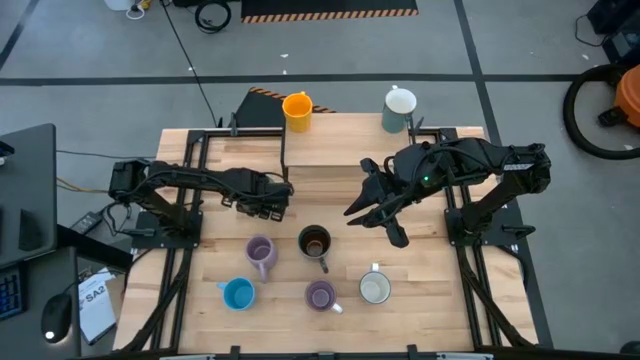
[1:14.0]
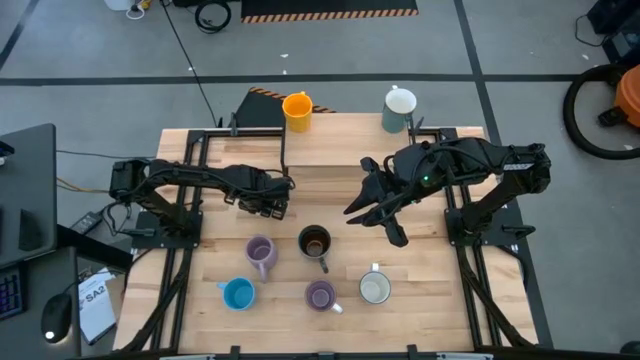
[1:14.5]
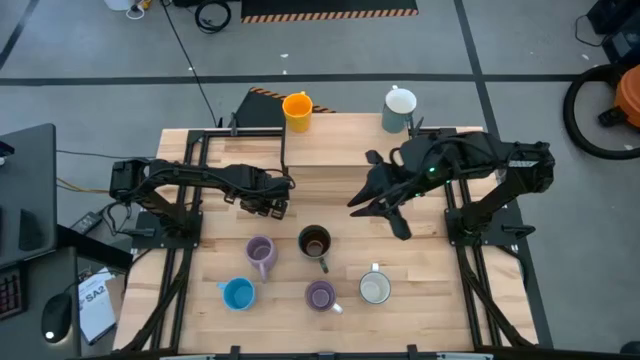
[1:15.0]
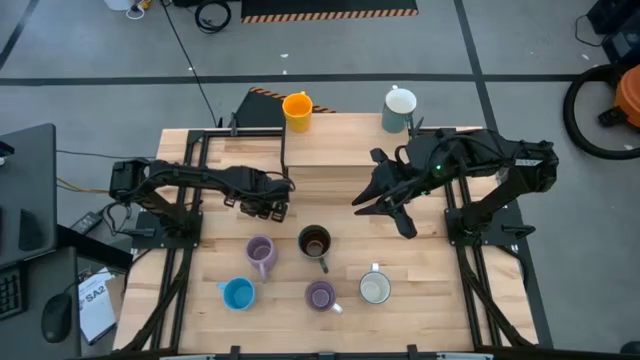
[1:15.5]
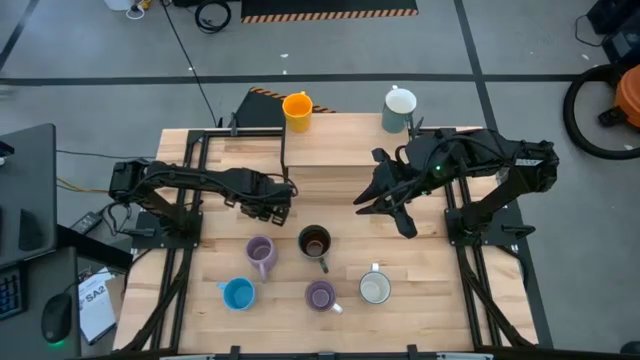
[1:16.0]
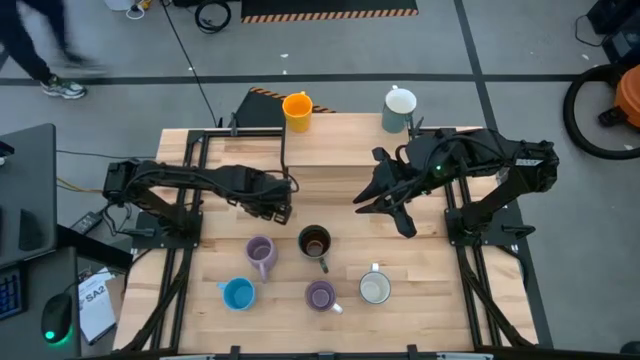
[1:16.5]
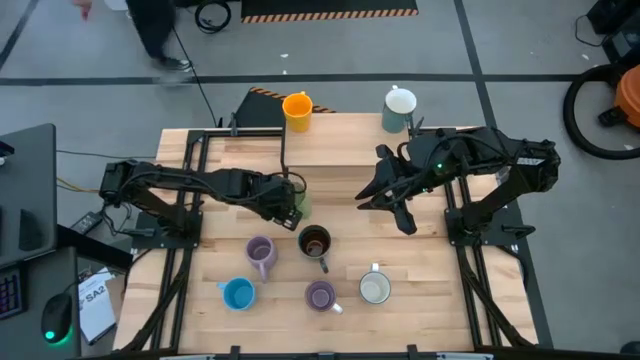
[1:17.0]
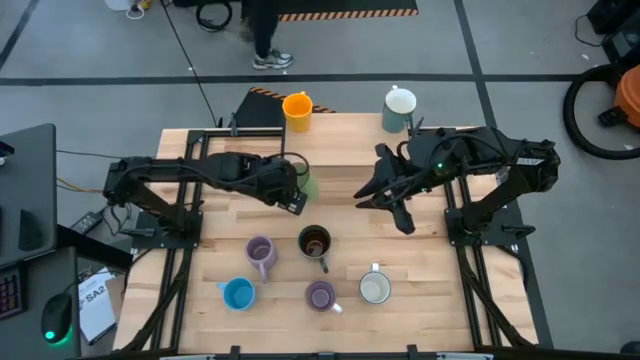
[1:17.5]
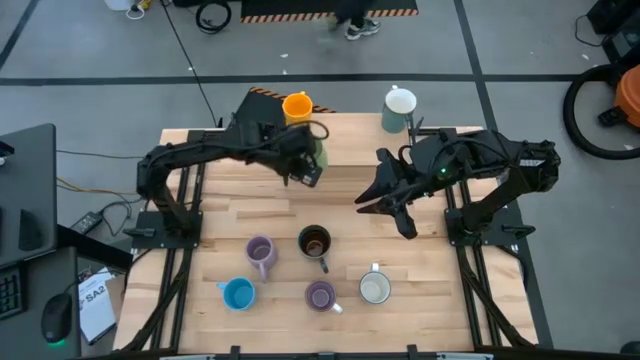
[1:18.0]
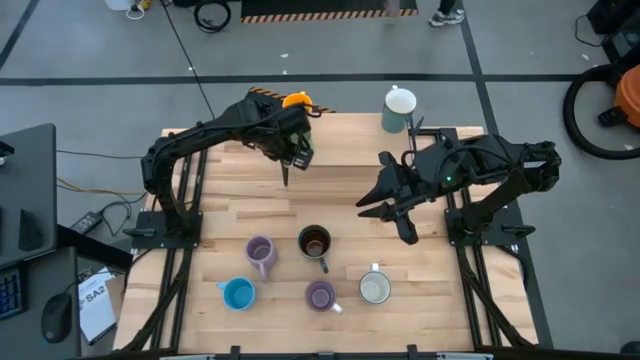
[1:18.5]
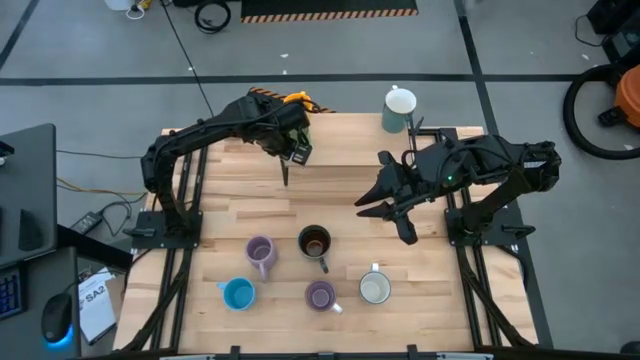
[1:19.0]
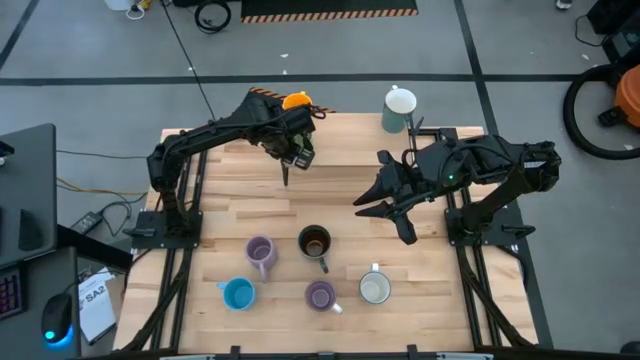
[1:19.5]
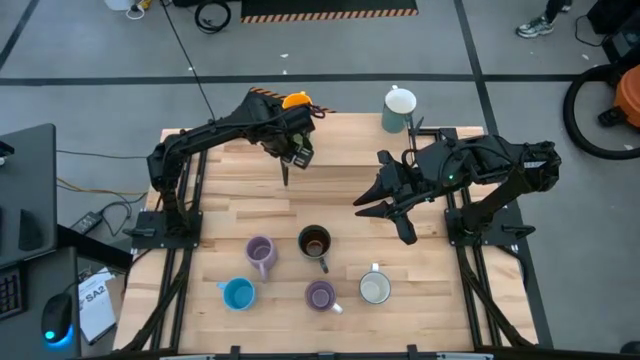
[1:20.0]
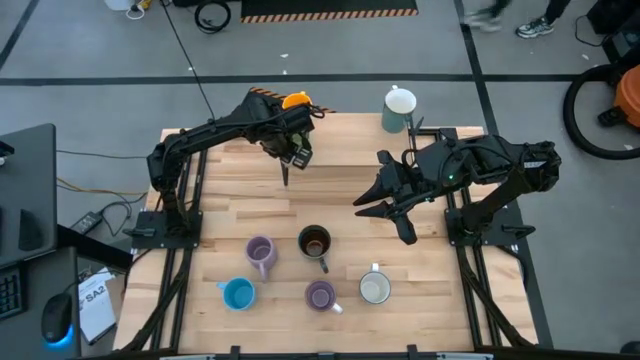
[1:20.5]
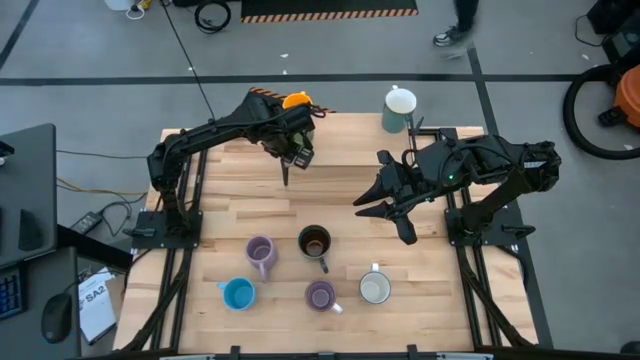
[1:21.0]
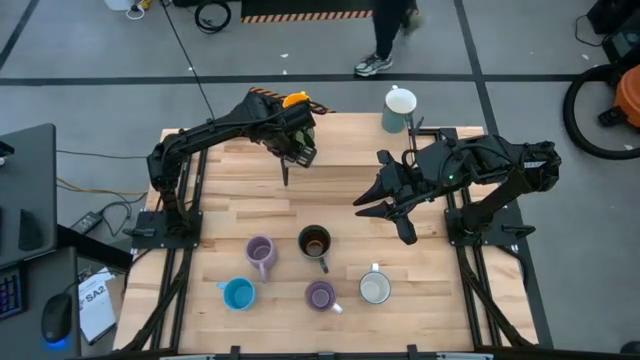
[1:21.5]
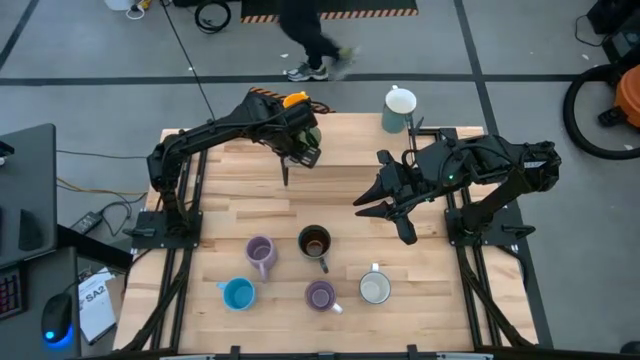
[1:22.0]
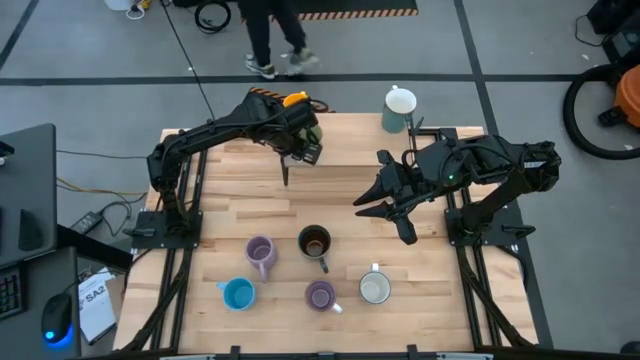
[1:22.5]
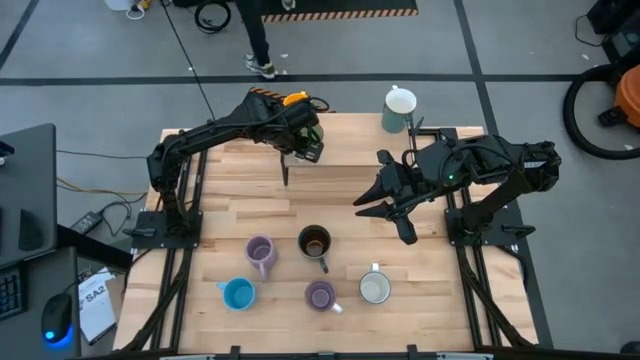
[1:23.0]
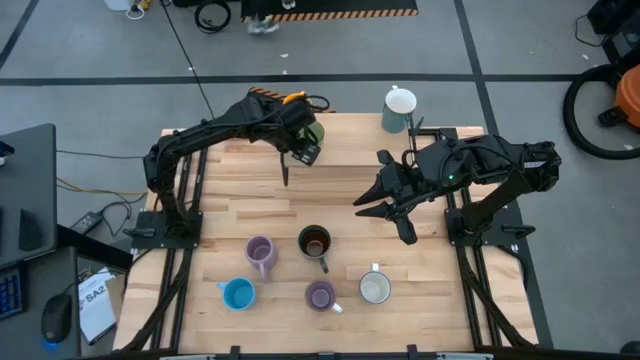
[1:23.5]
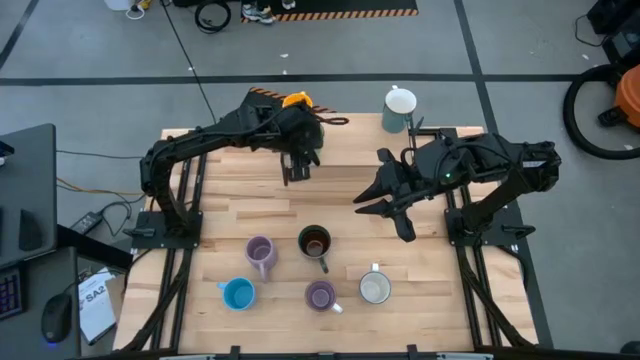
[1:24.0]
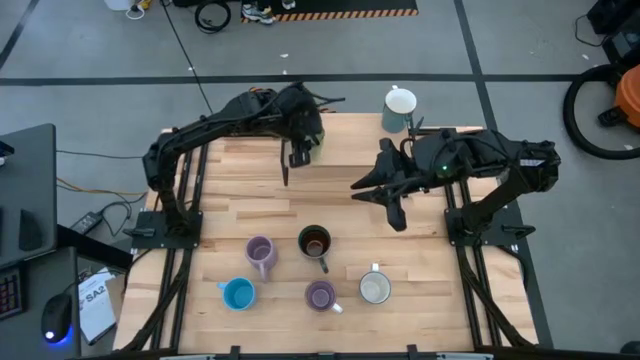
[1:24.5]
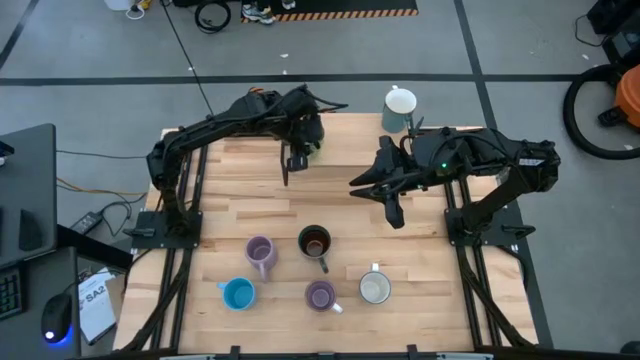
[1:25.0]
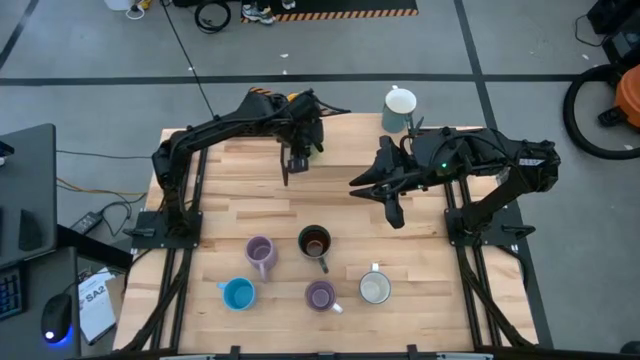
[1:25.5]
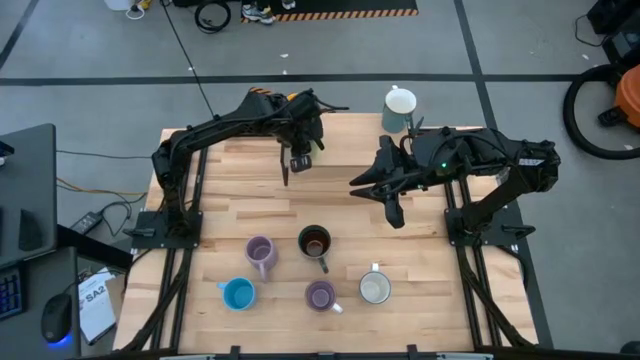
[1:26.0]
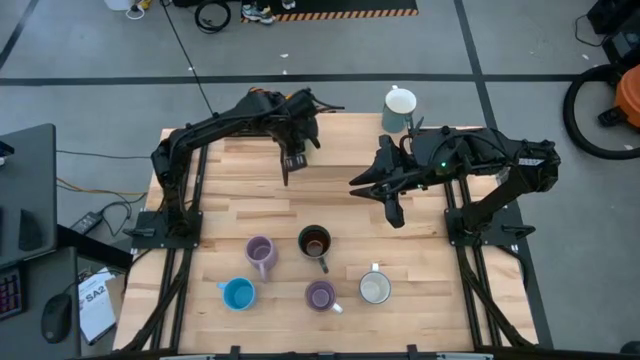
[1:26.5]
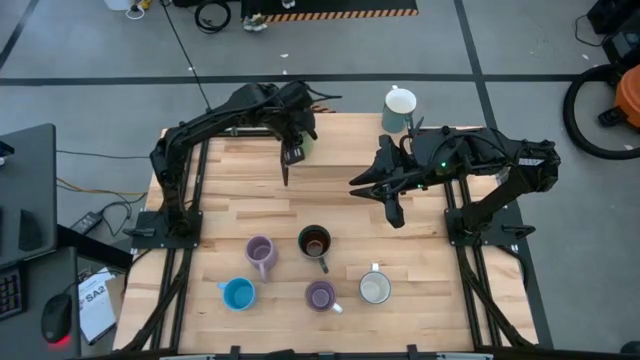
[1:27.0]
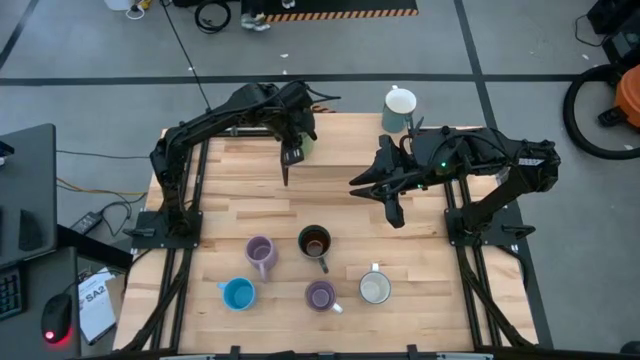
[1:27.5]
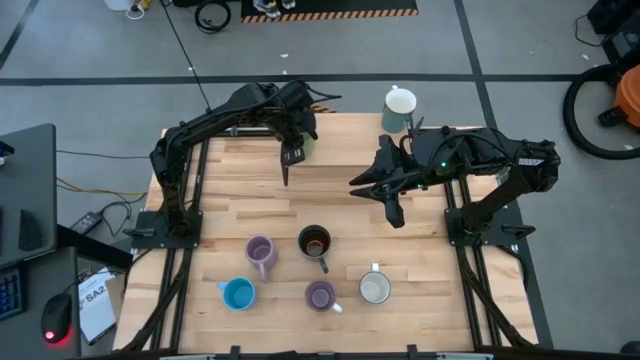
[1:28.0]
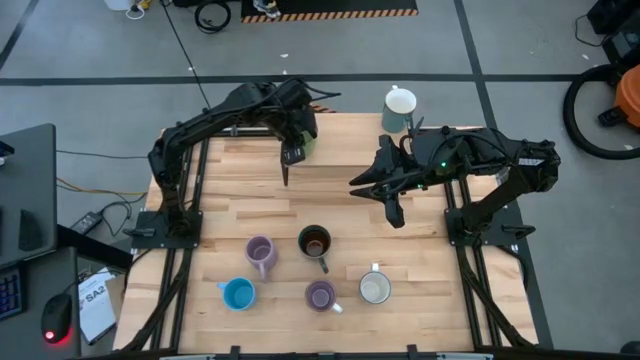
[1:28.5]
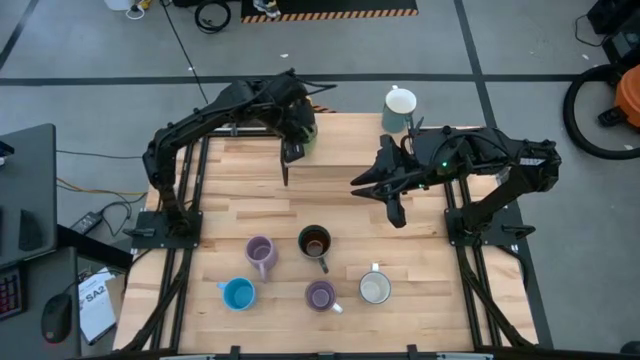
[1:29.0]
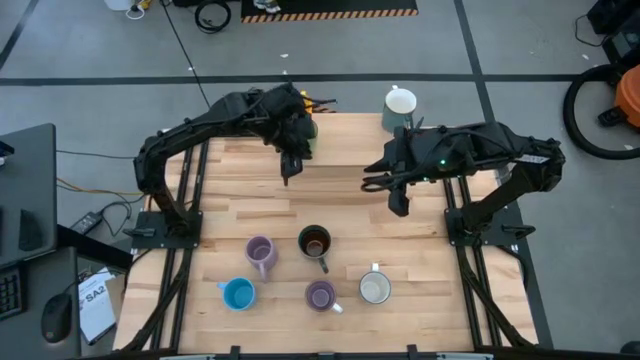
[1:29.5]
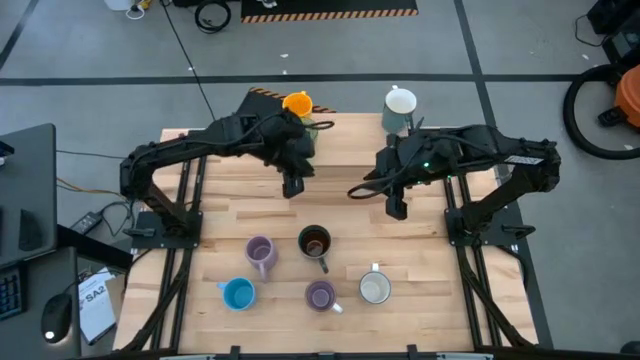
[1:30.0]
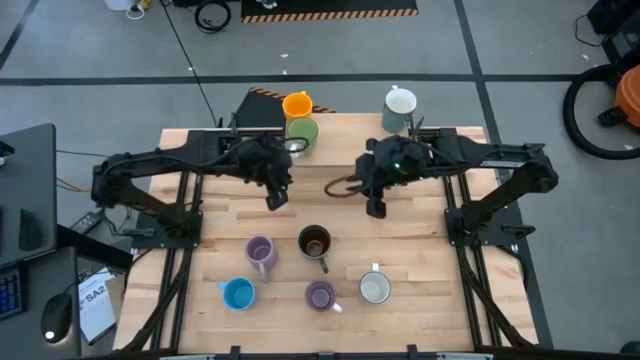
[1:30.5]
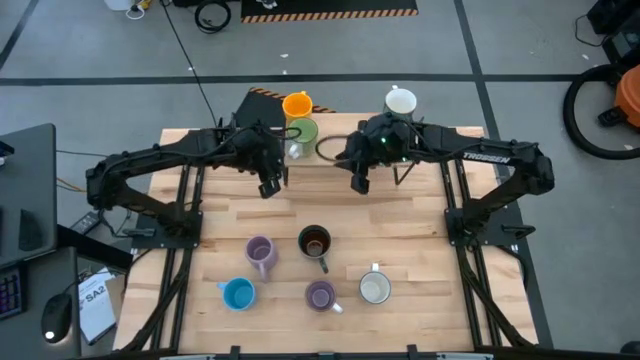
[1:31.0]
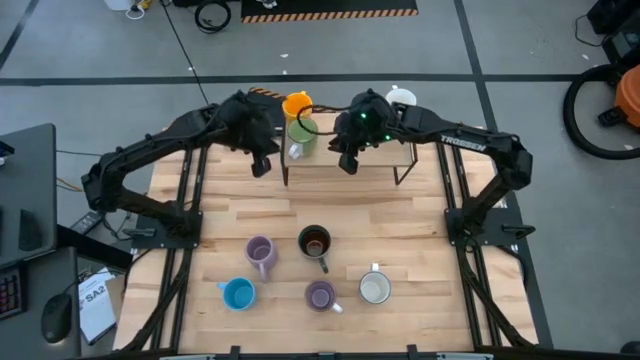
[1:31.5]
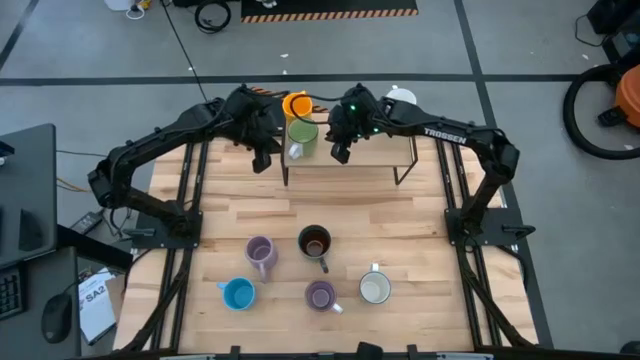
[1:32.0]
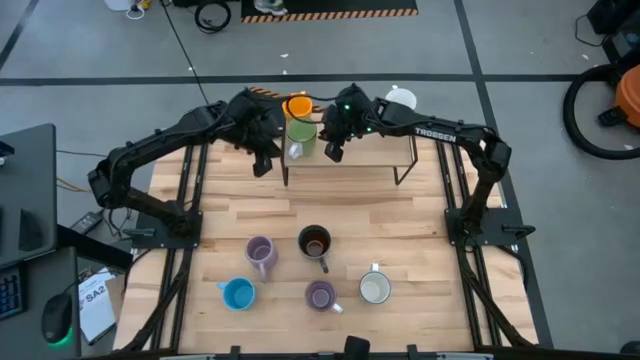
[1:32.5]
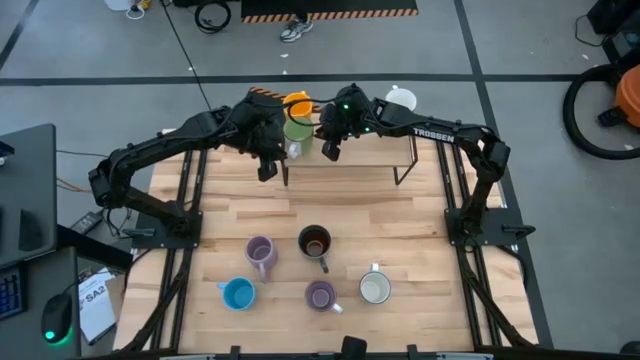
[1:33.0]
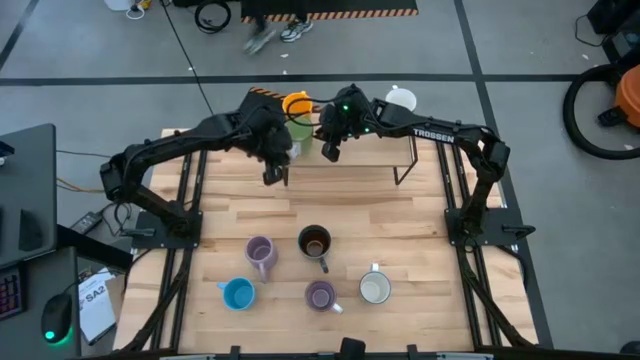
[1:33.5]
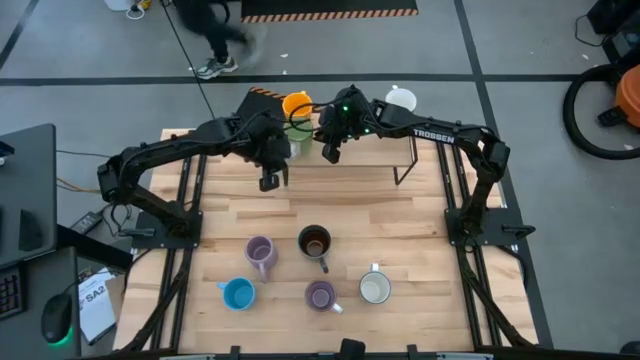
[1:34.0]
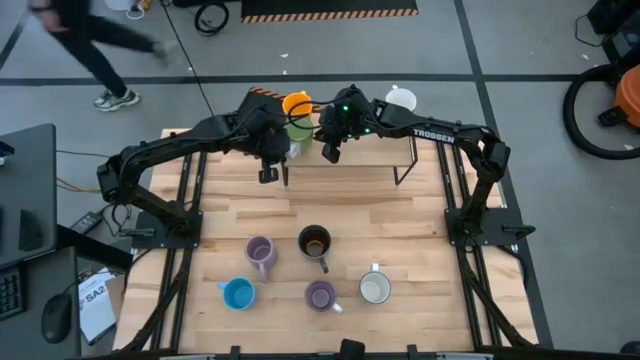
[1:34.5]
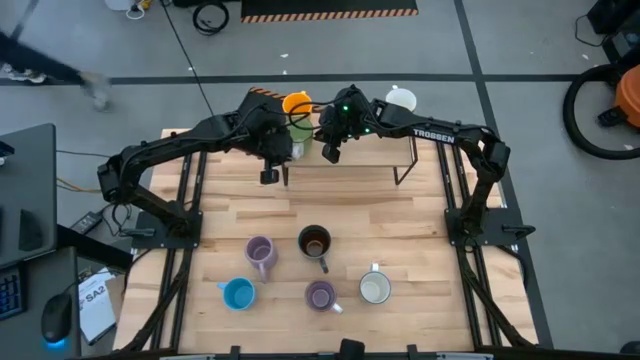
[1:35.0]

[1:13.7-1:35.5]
Task: Place coffee mugs
Put the green and white mug on the shelf
